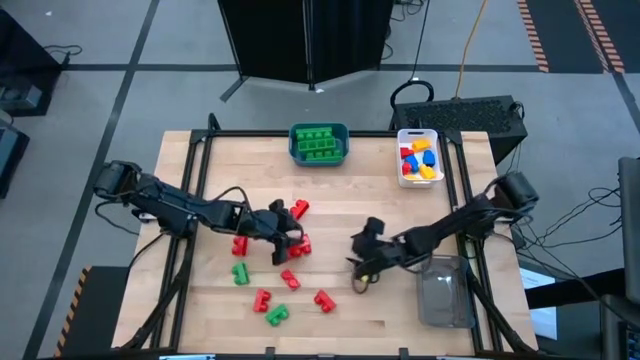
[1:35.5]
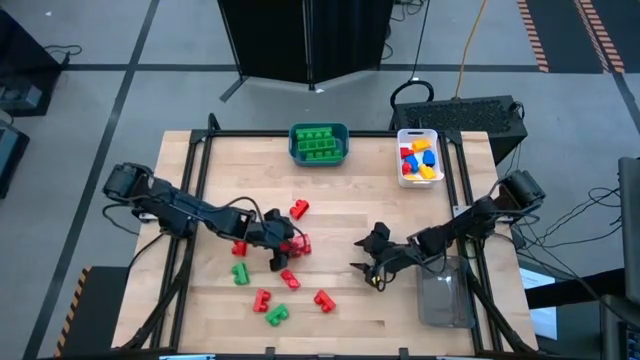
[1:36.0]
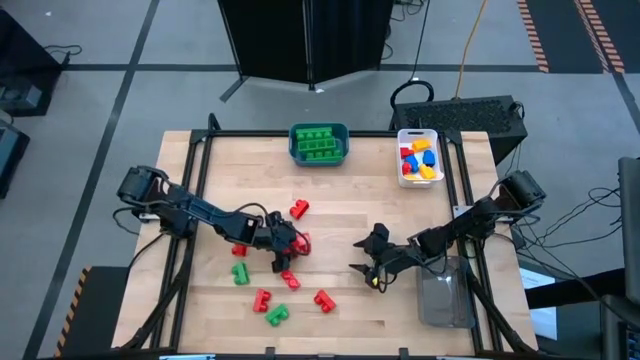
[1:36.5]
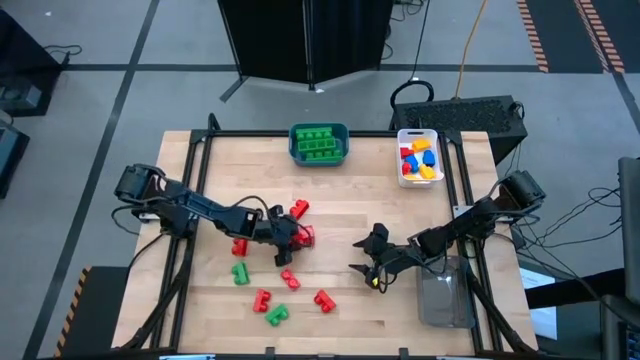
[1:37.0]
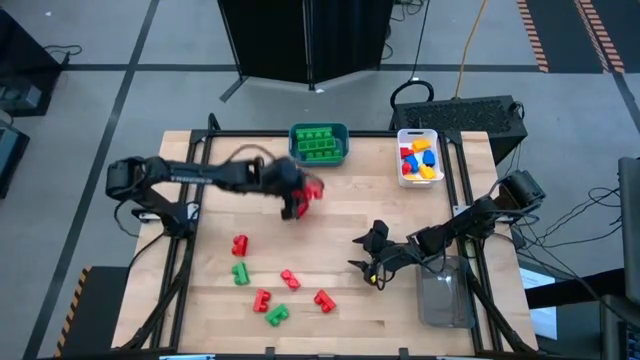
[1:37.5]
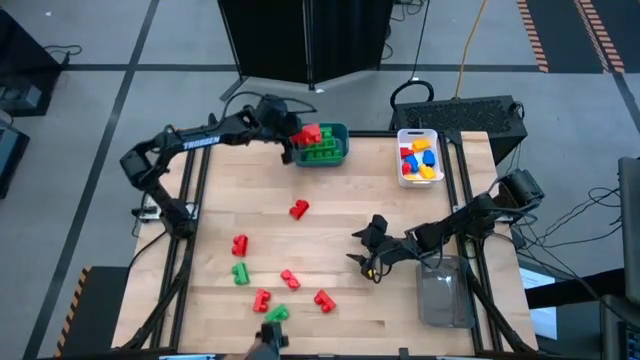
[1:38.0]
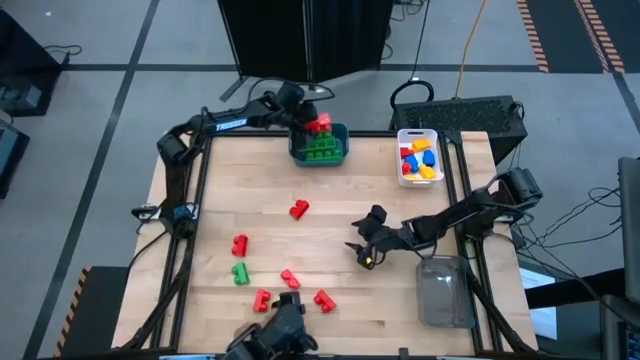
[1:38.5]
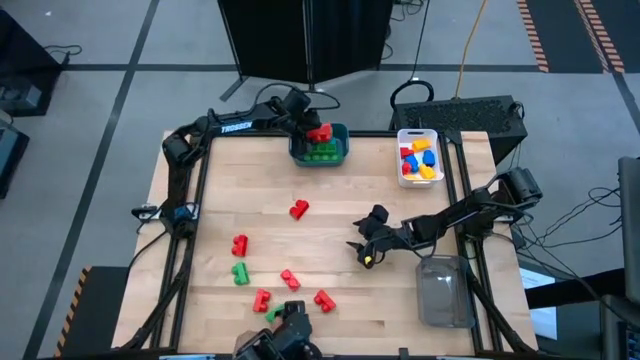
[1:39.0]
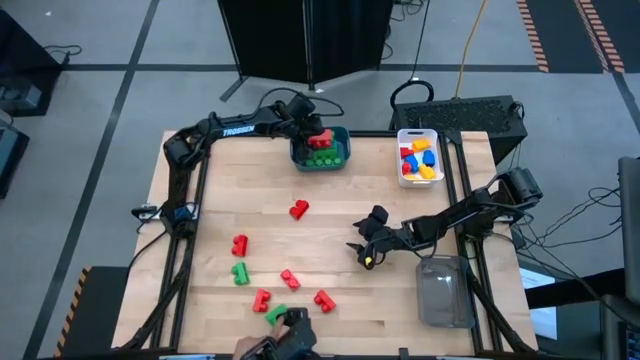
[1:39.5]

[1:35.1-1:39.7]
Task: Sort blocks by size
Put the three stud red game piece into the blue bin

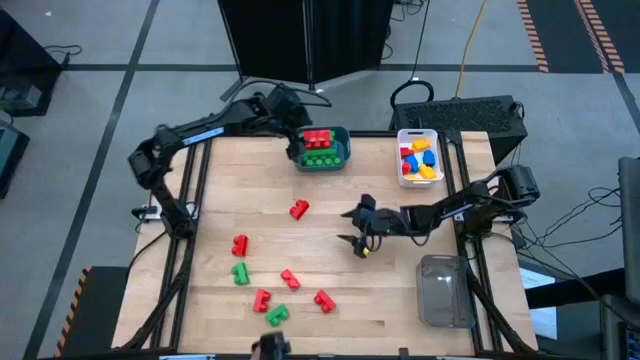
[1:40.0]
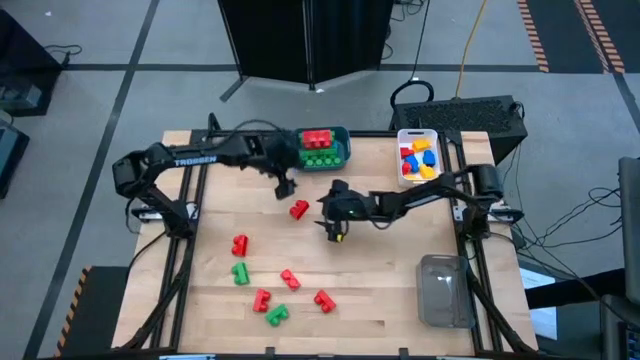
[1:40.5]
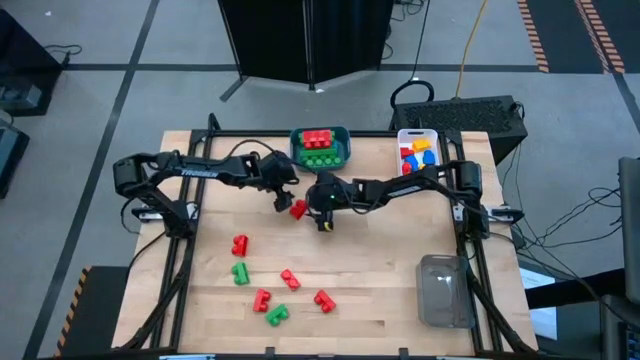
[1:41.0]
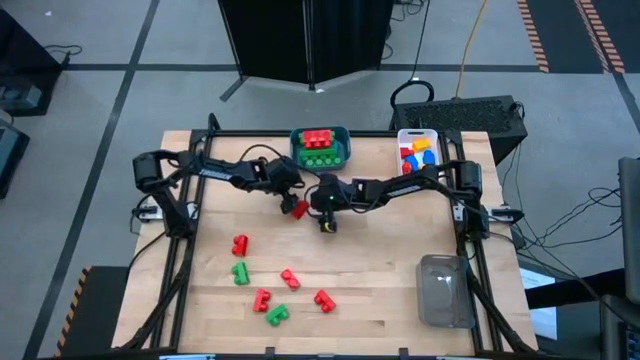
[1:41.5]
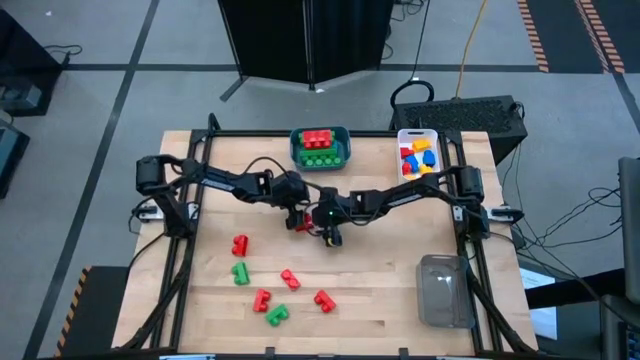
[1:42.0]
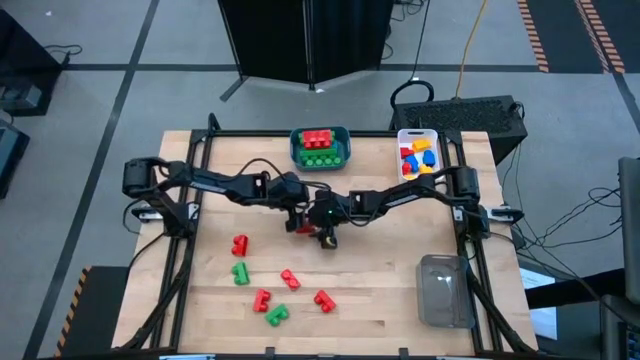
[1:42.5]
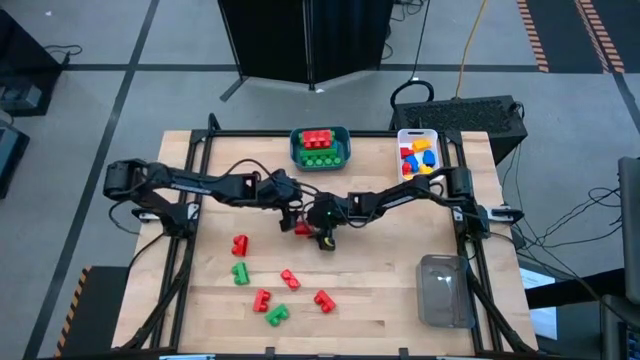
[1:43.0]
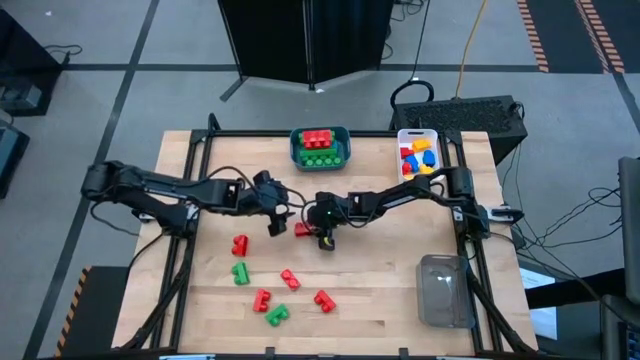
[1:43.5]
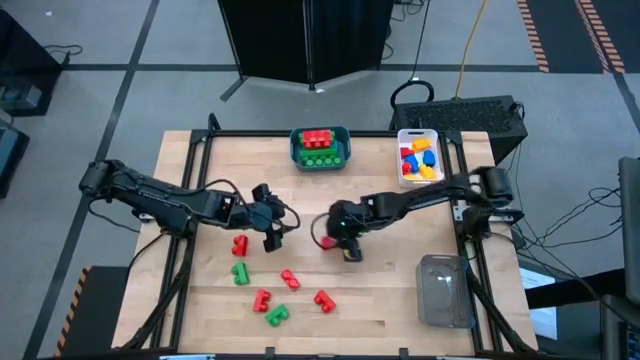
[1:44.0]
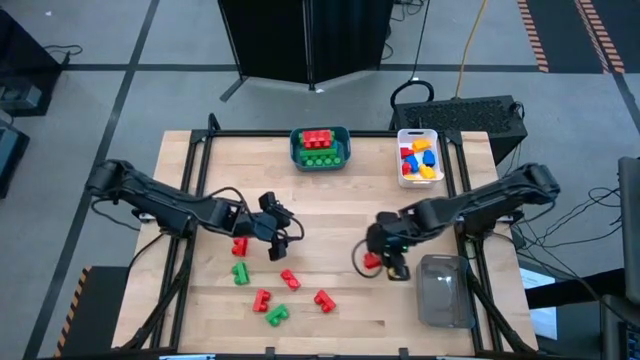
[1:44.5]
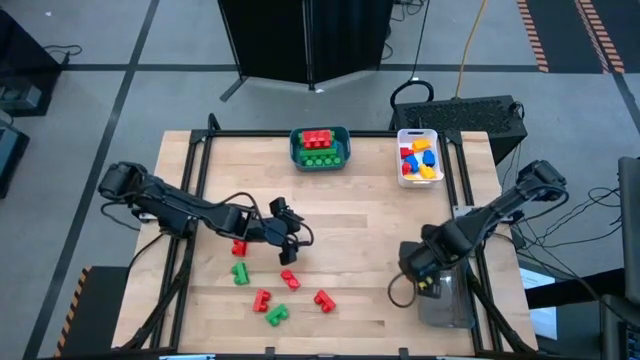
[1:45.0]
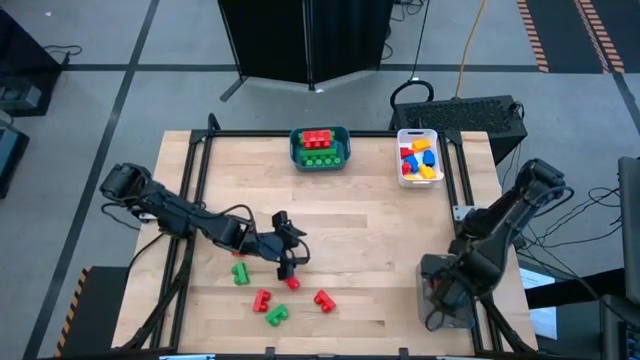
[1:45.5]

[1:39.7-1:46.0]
Put the two stud red game piece into the black transparent bin

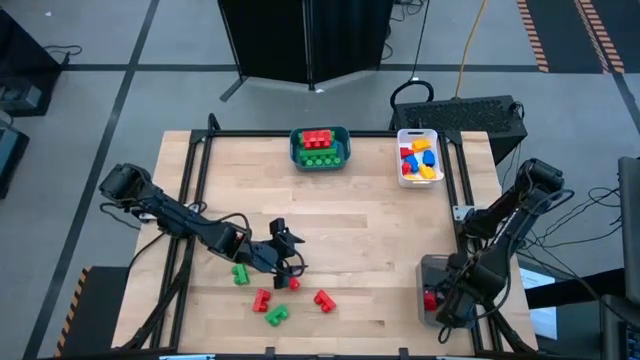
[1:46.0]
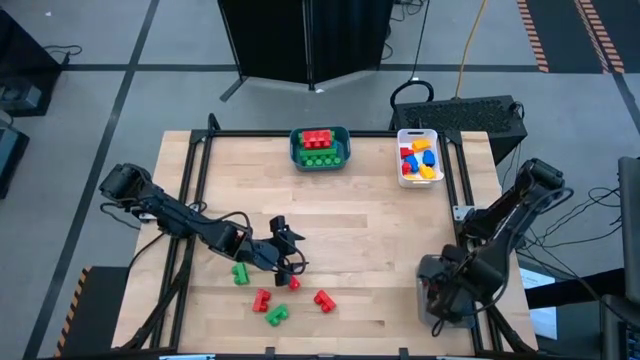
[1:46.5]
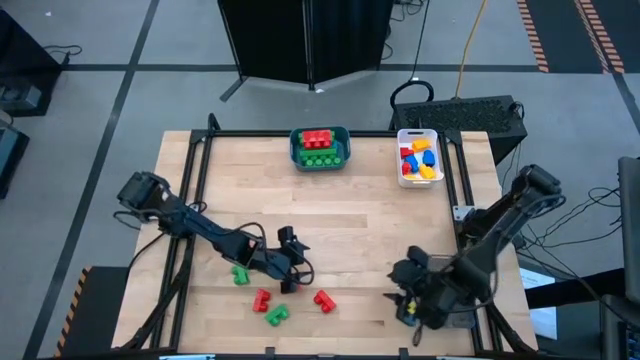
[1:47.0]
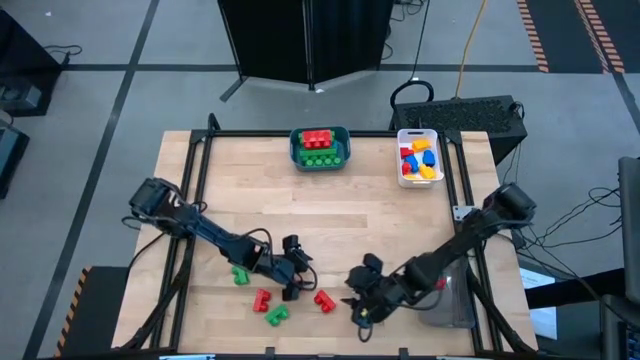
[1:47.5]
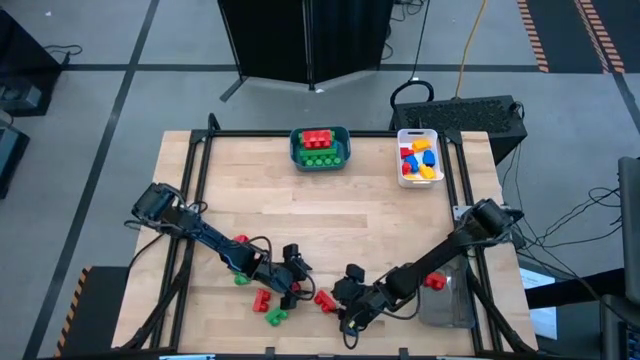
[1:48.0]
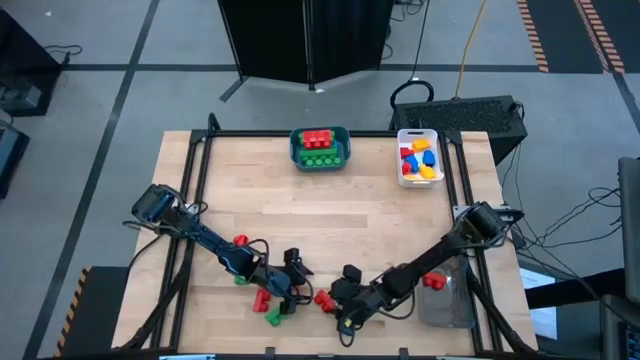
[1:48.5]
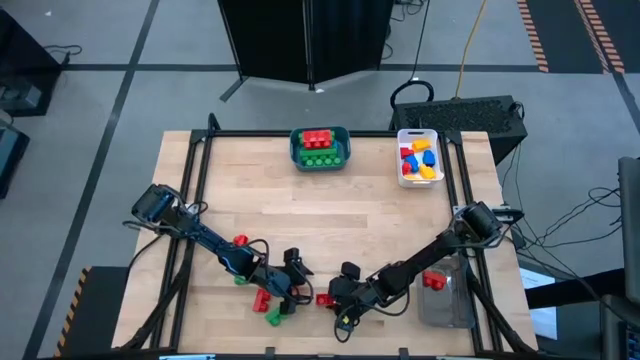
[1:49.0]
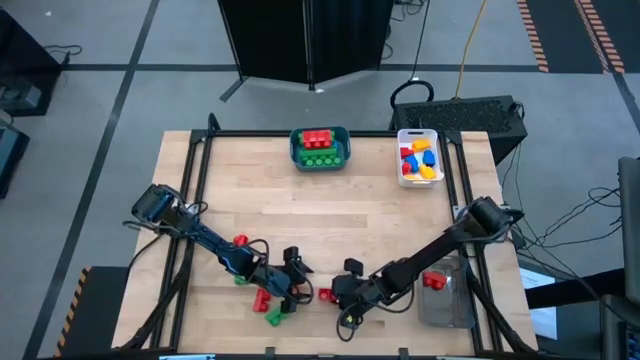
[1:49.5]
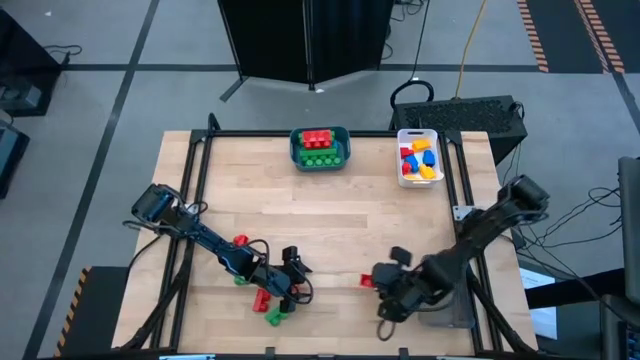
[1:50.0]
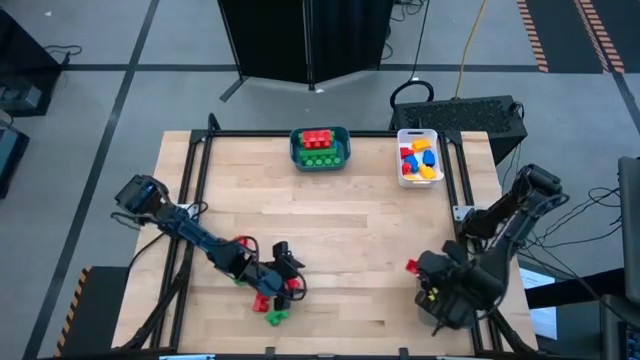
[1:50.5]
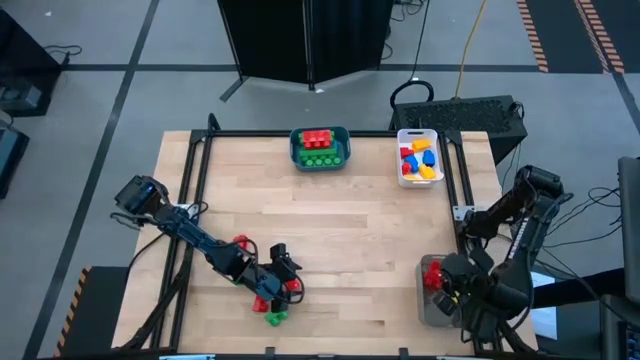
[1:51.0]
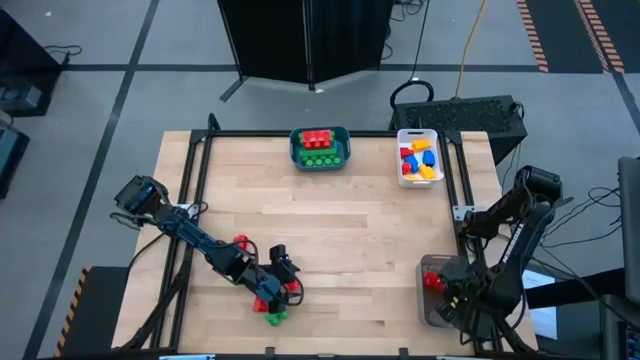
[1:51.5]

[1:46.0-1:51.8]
Put the two stud red game piece into the black transparent bin

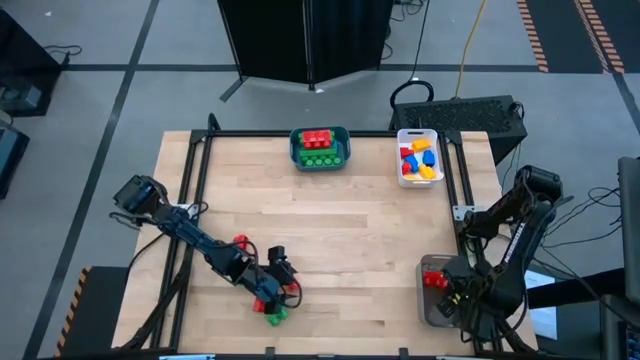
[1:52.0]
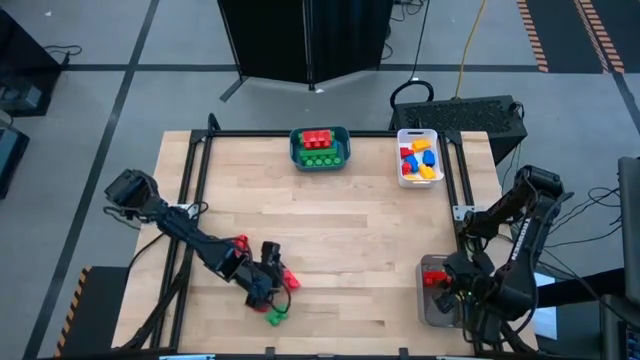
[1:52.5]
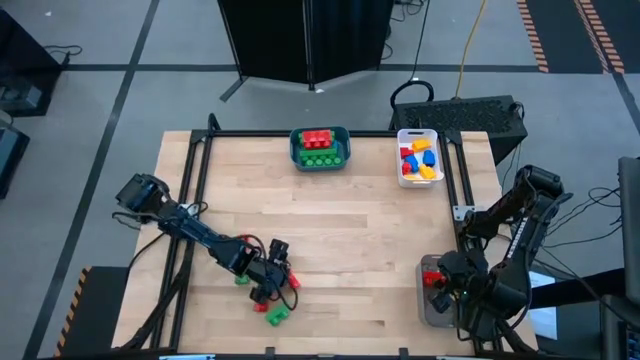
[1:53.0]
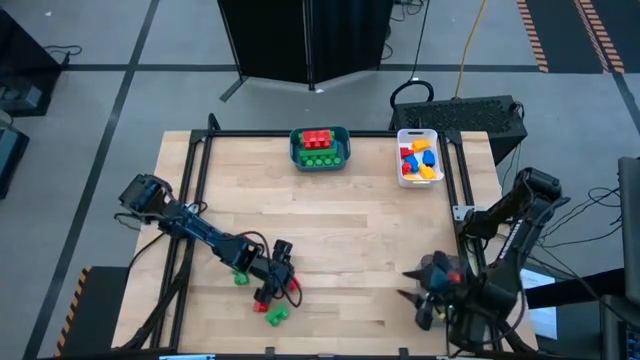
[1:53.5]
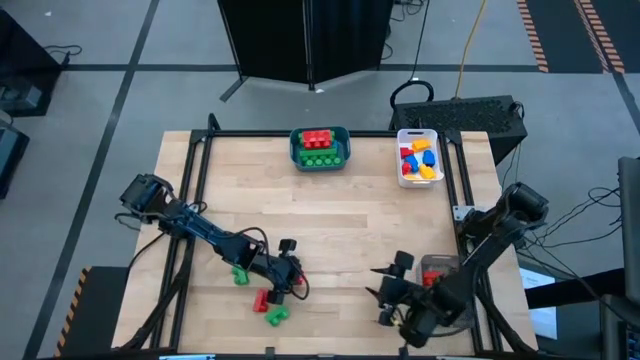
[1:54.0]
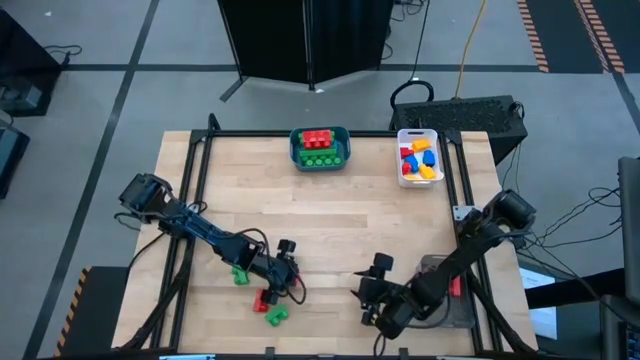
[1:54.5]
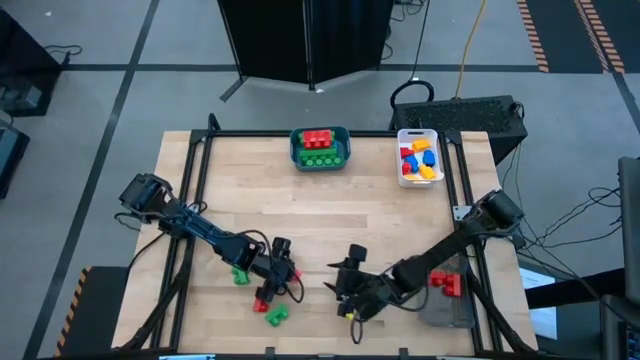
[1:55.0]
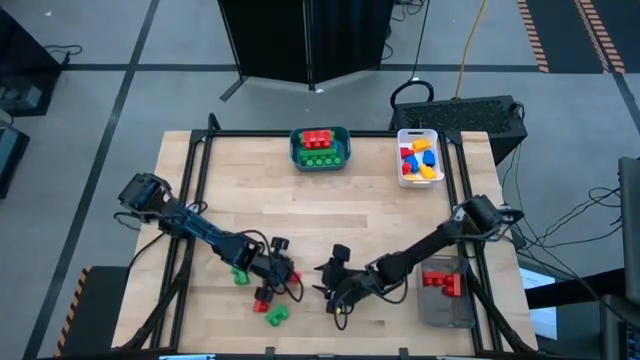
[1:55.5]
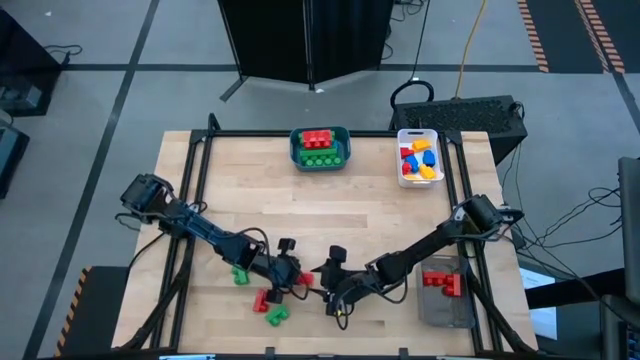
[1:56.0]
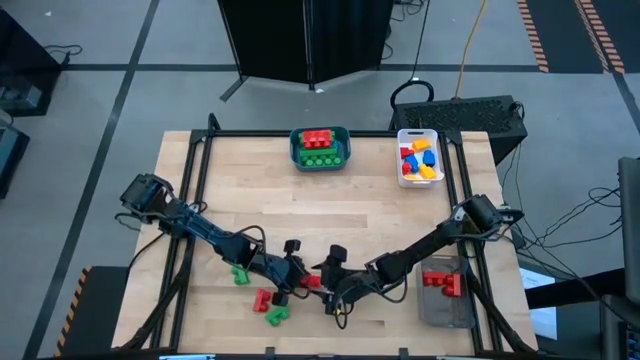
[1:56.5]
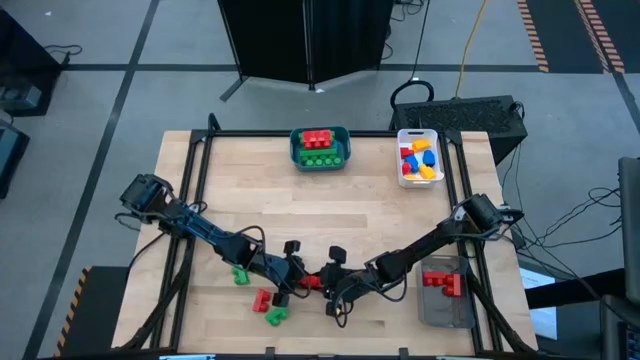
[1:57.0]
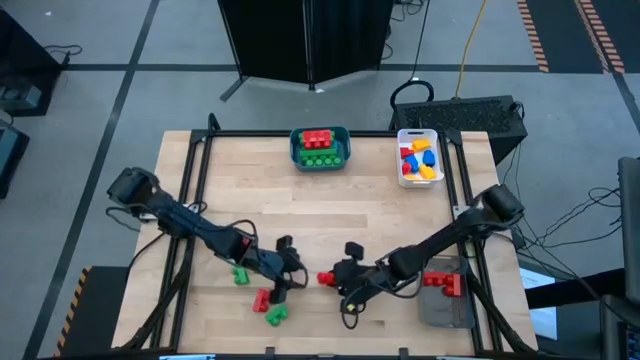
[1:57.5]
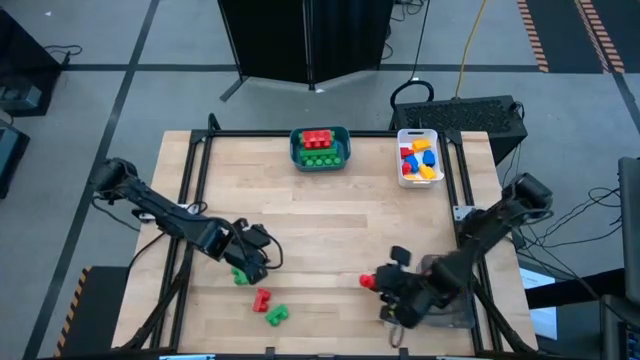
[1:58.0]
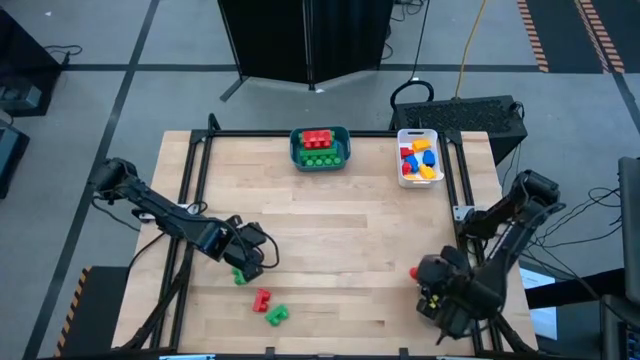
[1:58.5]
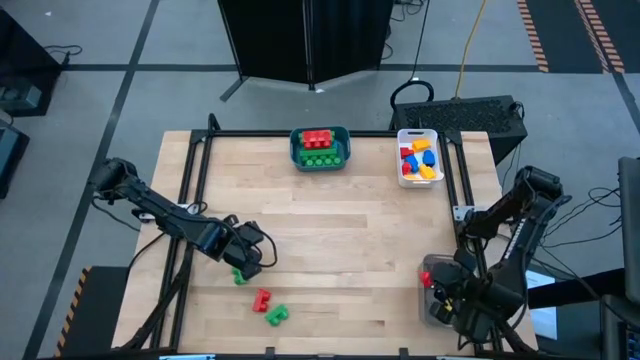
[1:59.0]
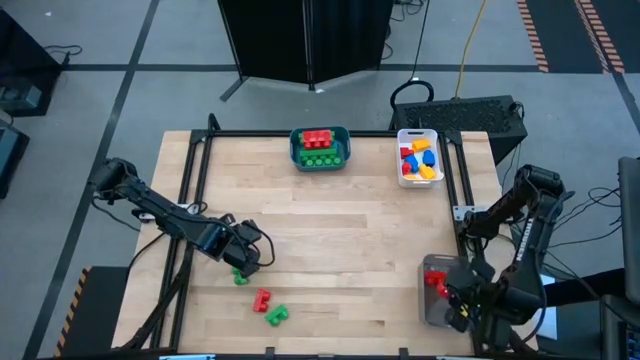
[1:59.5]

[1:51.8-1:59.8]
Put the two stud red game piece into the black transparent bin
